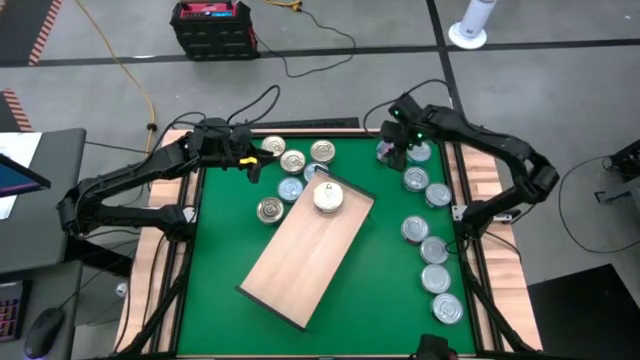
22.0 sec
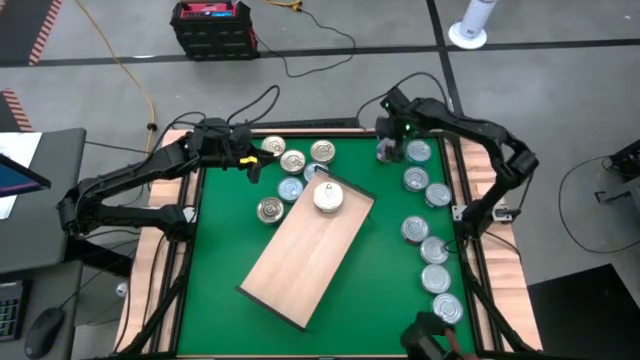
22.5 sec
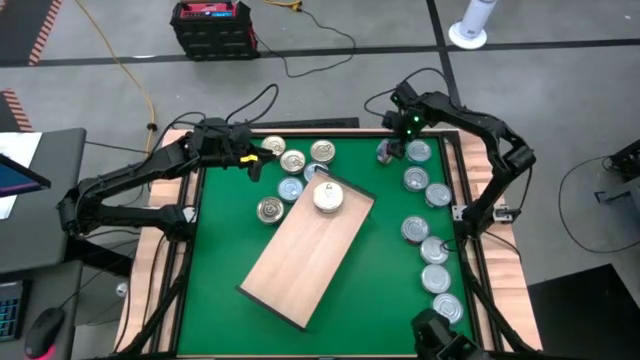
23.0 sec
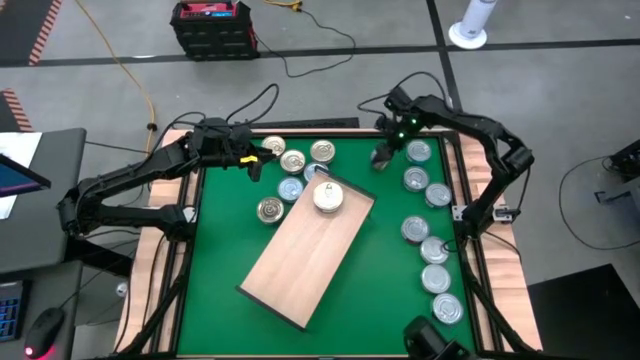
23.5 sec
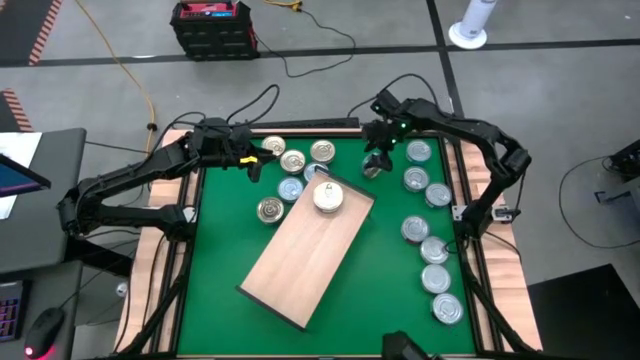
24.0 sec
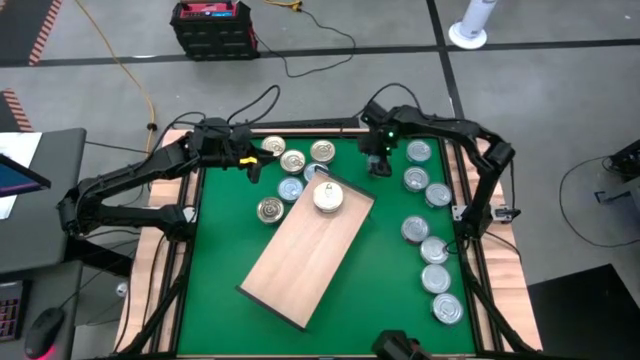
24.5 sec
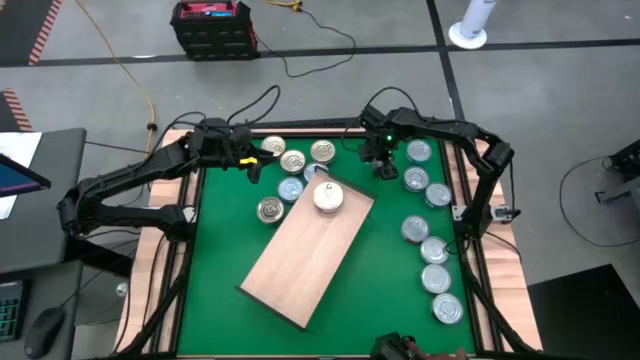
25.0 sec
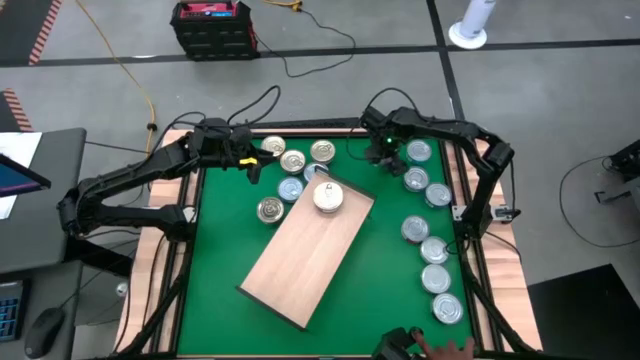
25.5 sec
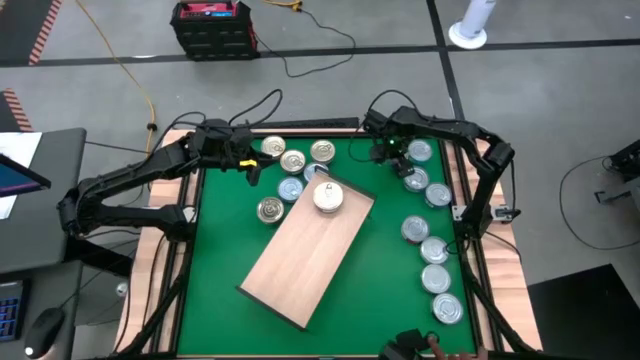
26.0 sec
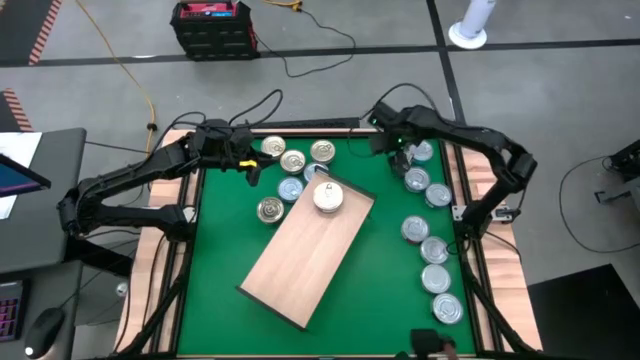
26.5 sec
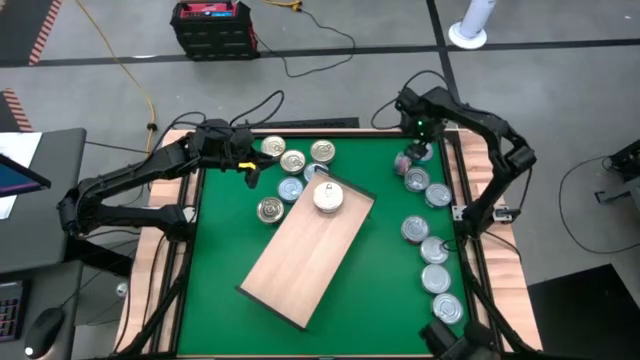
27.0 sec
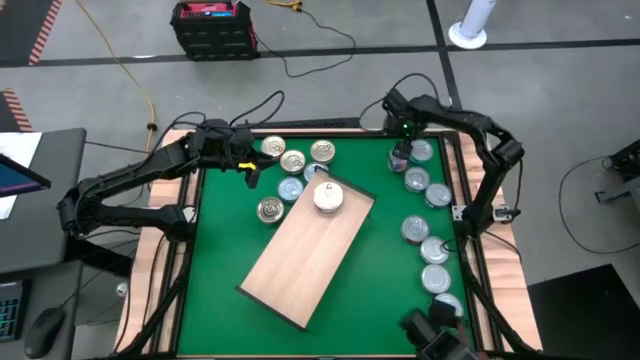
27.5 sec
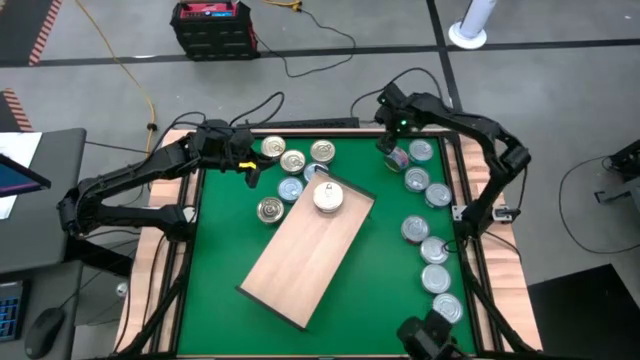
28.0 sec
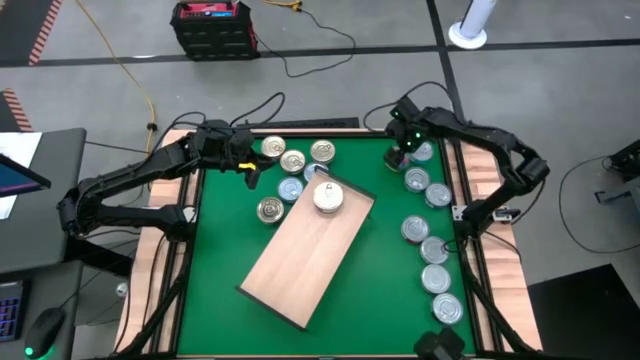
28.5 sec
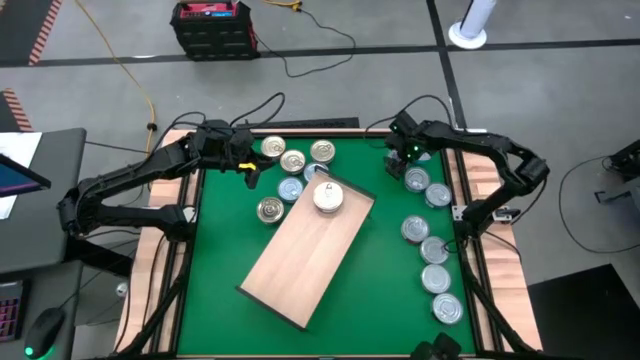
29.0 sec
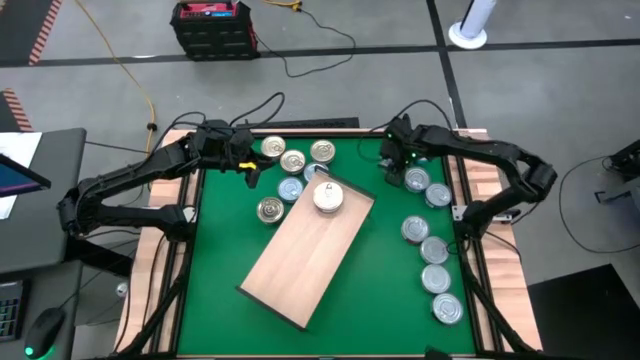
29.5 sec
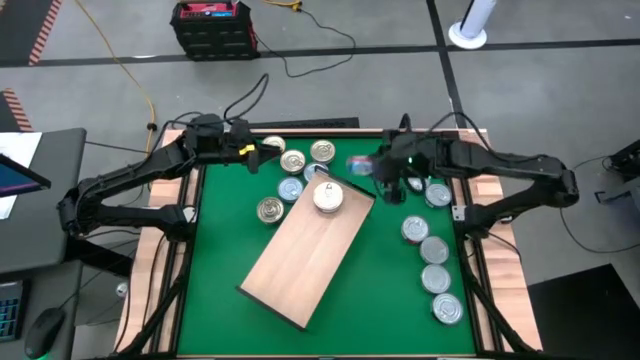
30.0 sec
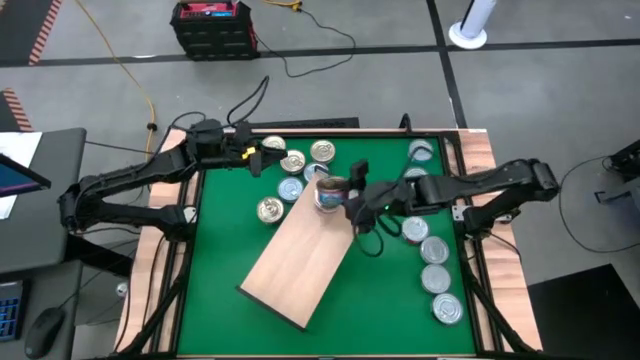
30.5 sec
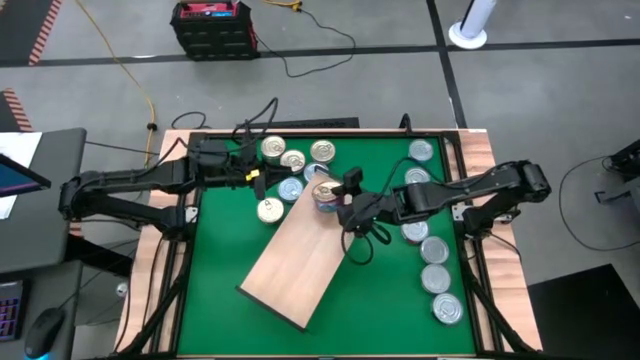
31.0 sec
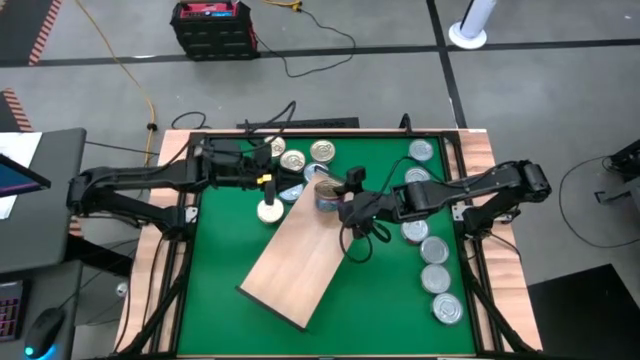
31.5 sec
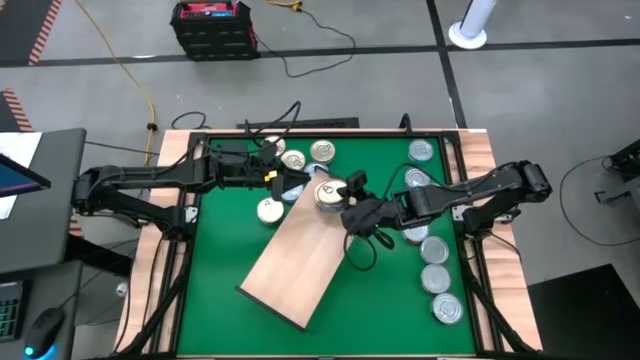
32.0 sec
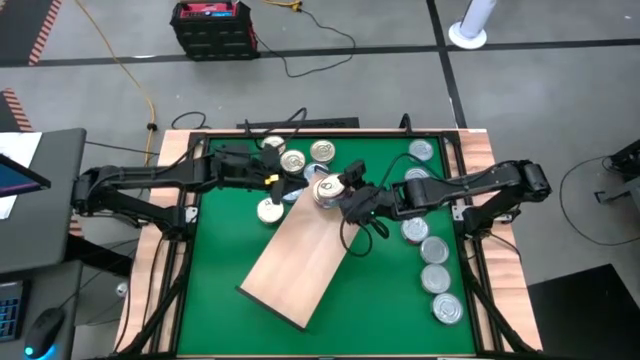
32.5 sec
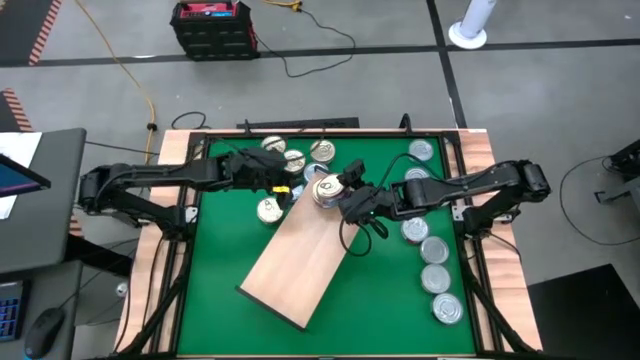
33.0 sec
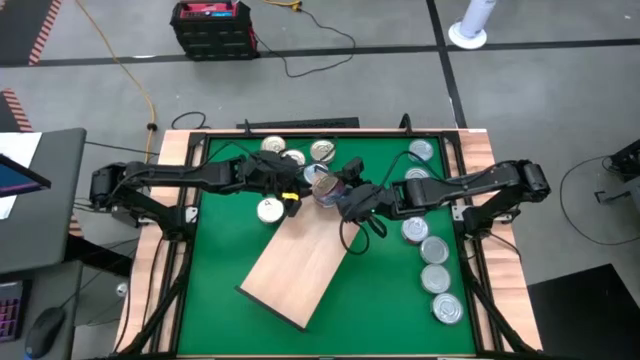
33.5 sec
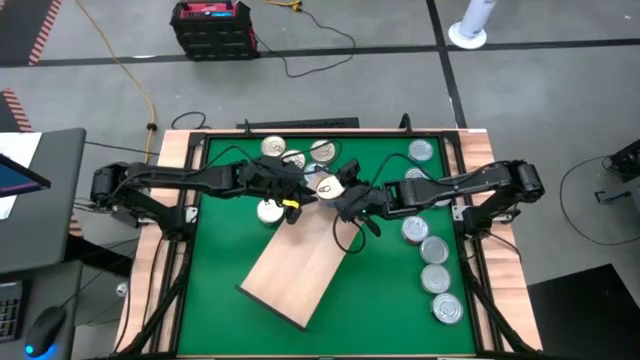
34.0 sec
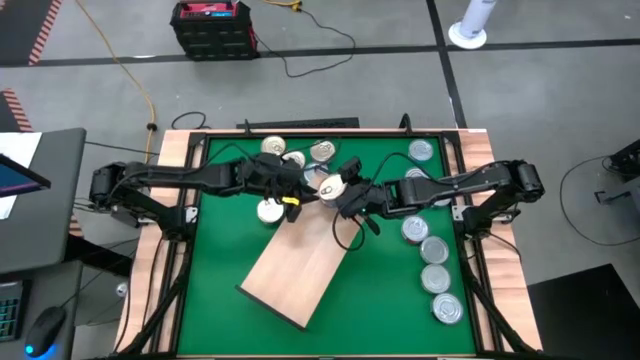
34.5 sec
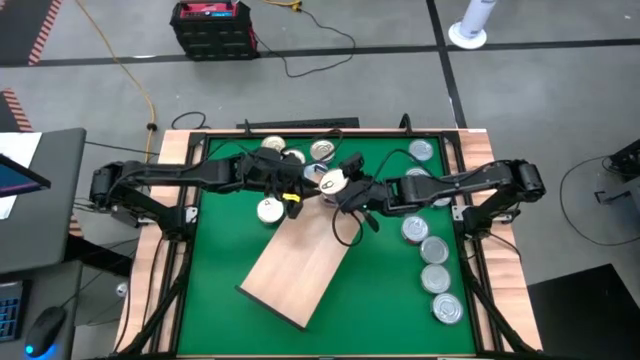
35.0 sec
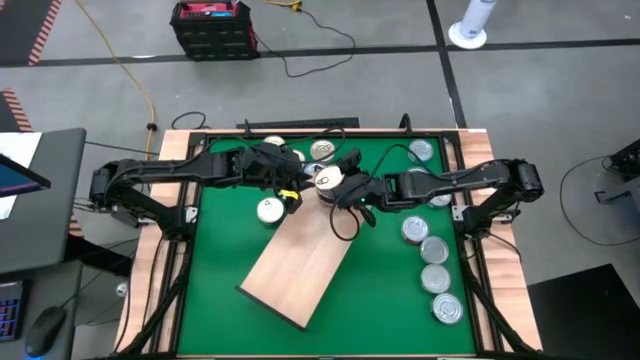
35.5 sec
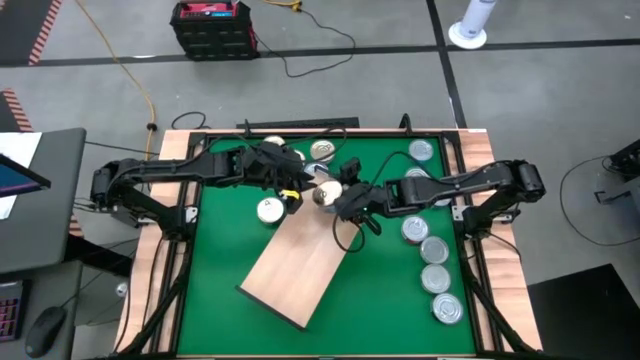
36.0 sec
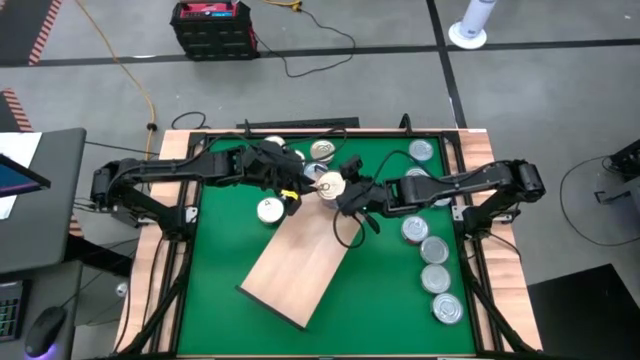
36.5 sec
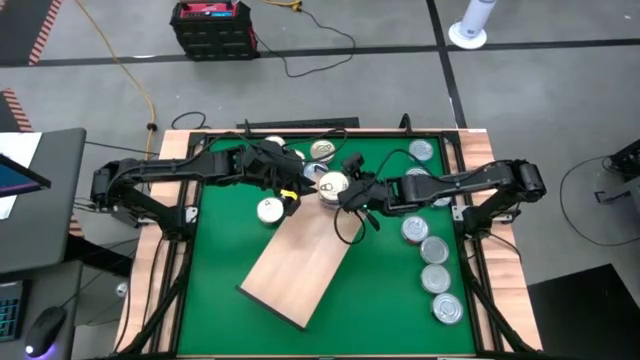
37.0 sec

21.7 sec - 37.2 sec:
Task: Stack canned seafood by type on shelf
Stack the blue pink tuna can on top of the other blue pink tuna can on the shelf

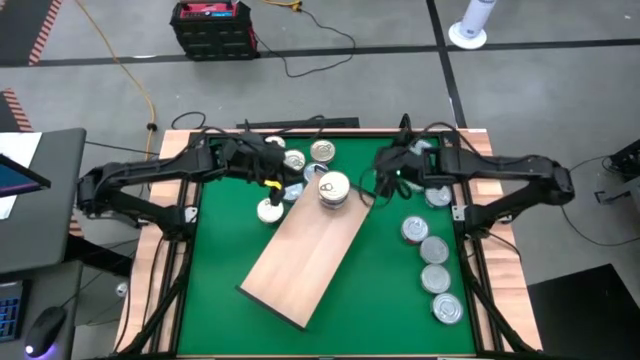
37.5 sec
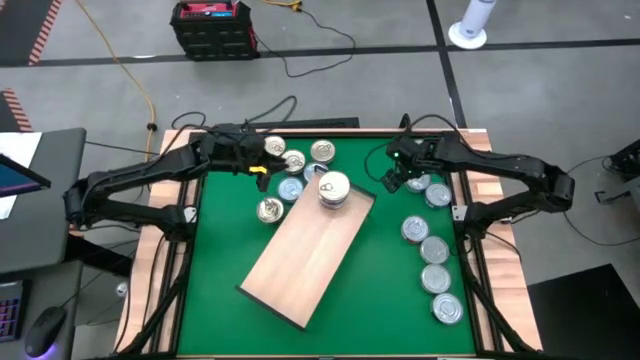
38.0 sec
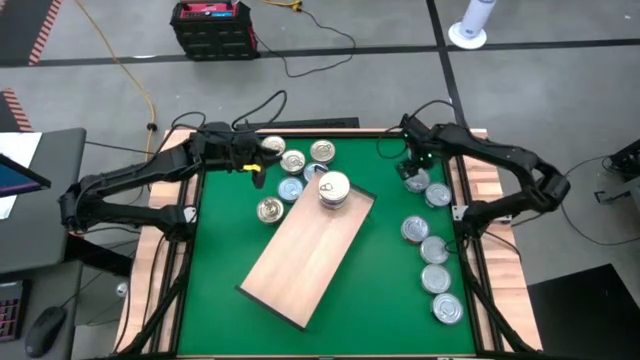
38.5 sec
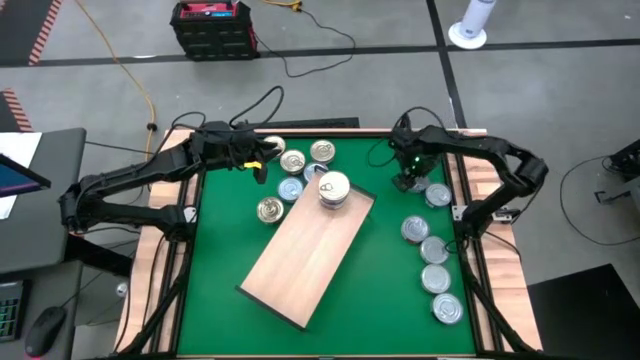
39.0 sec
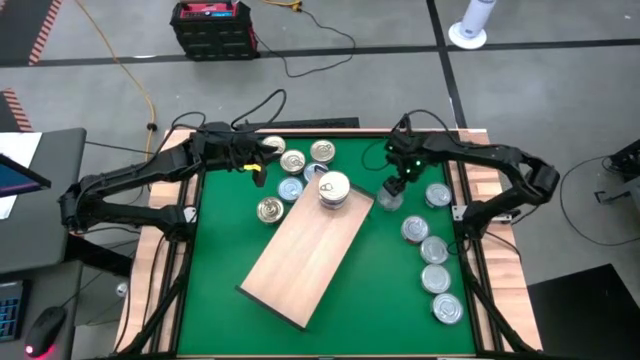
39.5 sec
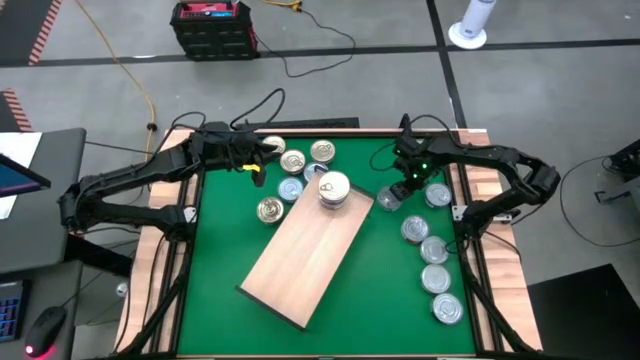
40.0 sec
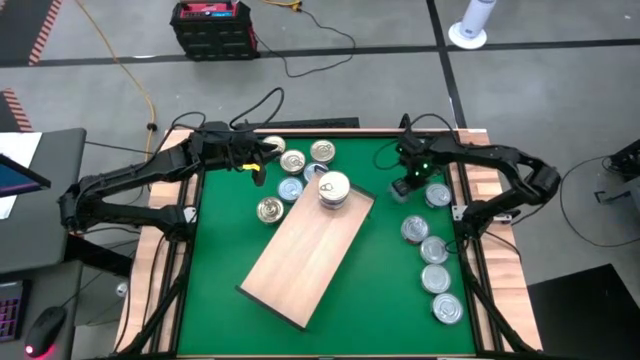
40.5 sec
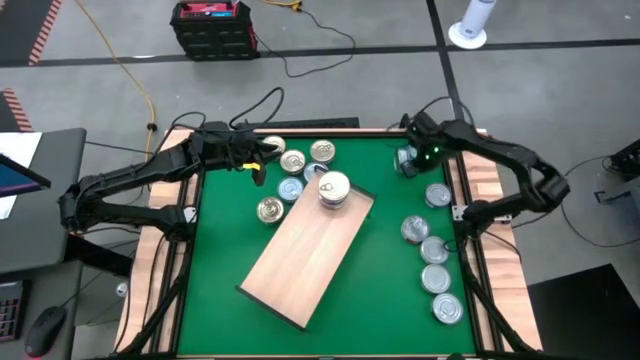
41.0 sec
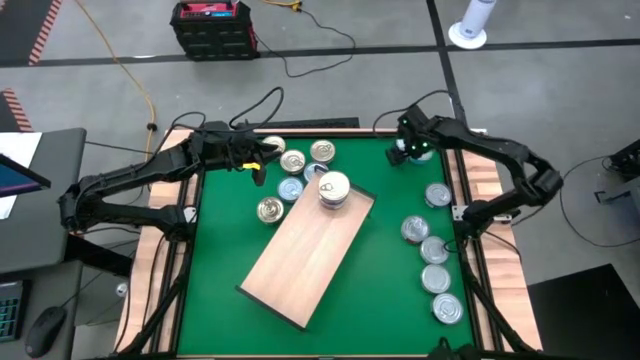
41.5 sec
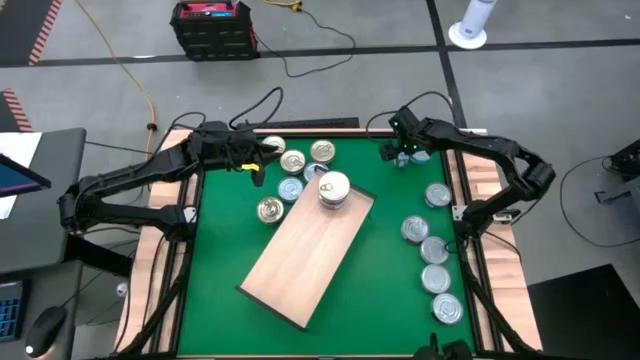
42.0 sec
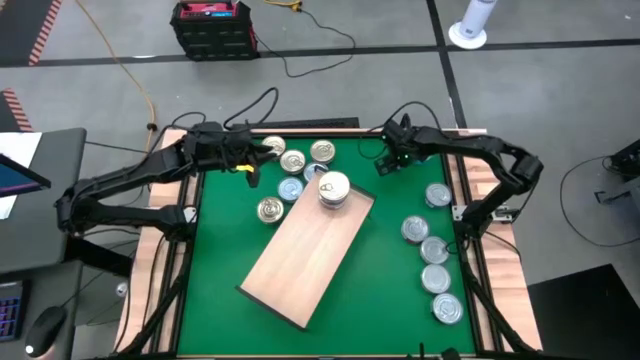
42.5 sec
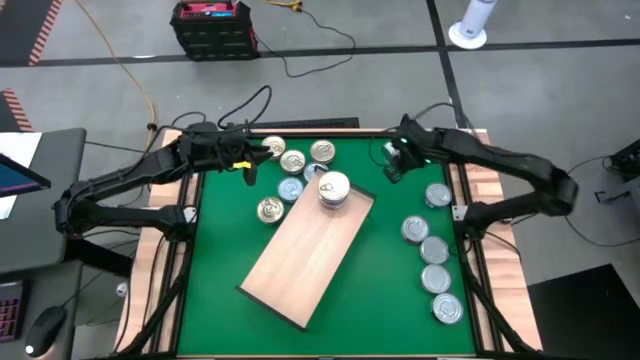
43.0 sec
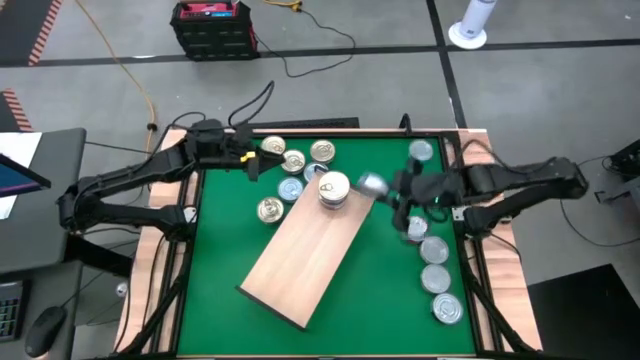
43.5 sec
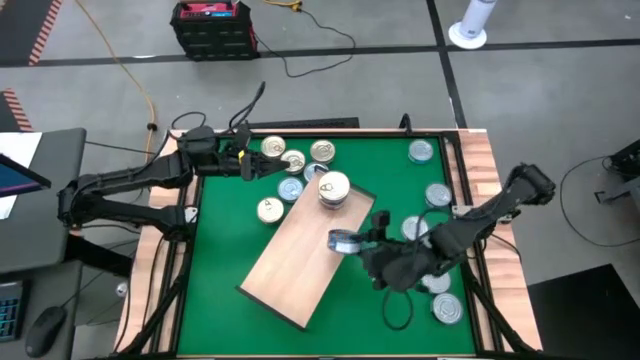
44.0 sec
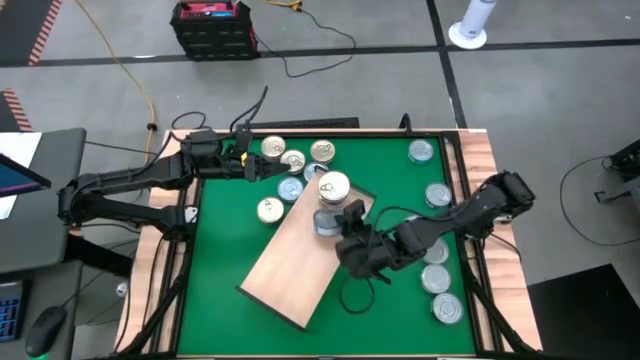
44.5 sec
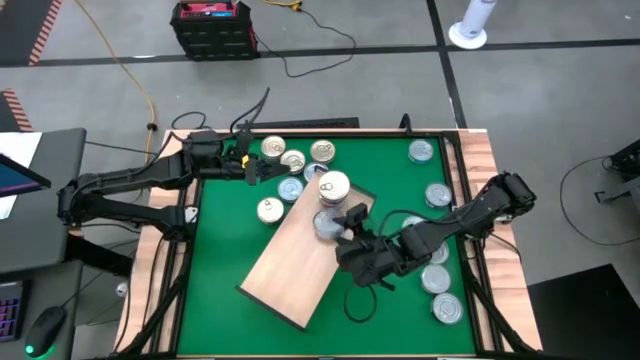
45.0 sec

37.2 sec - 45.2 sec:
Put the blue tuna can on the shelf
